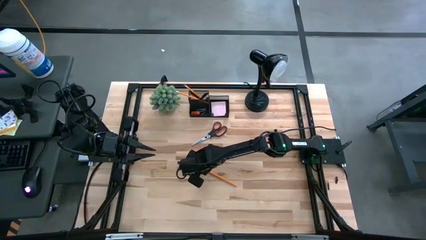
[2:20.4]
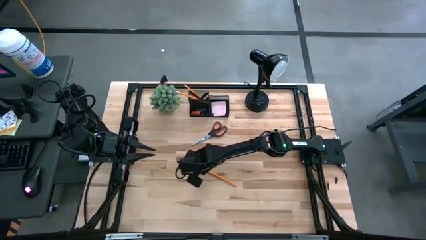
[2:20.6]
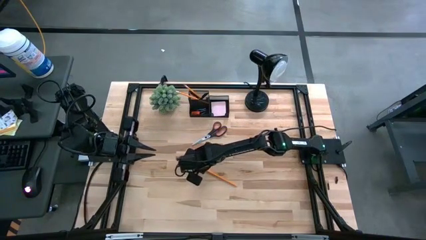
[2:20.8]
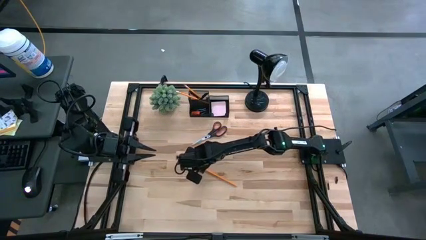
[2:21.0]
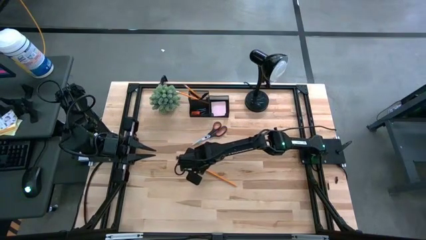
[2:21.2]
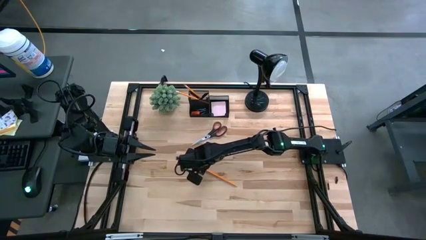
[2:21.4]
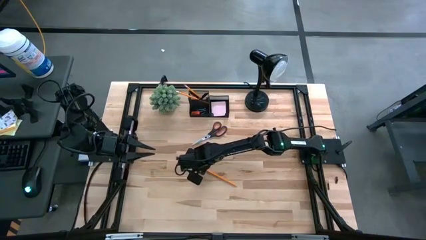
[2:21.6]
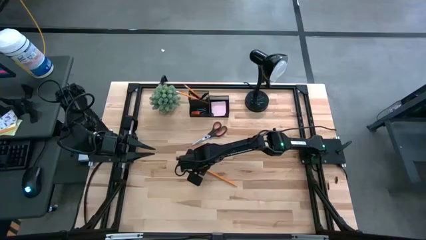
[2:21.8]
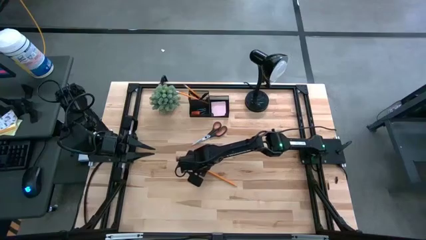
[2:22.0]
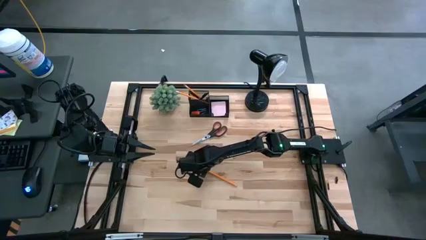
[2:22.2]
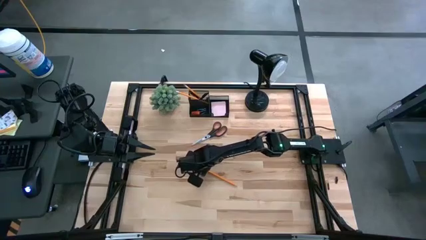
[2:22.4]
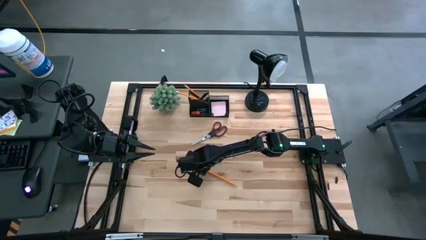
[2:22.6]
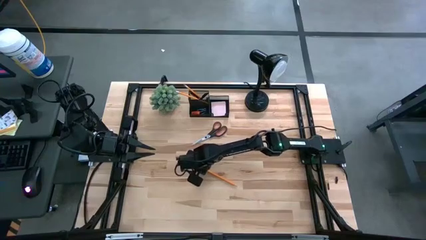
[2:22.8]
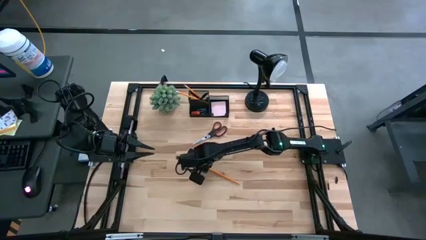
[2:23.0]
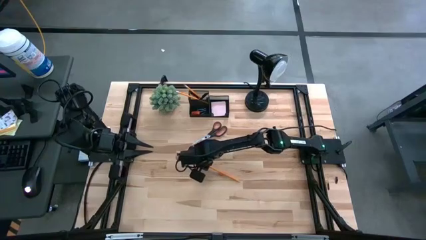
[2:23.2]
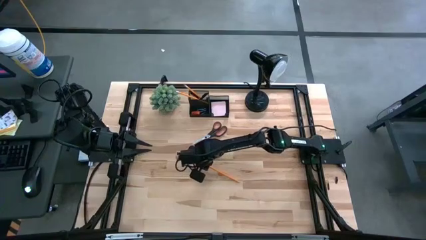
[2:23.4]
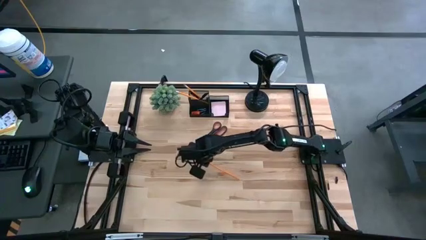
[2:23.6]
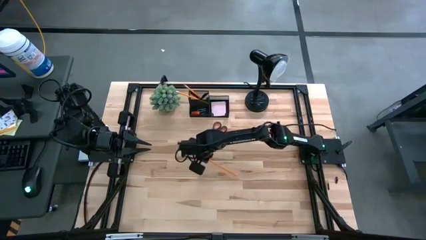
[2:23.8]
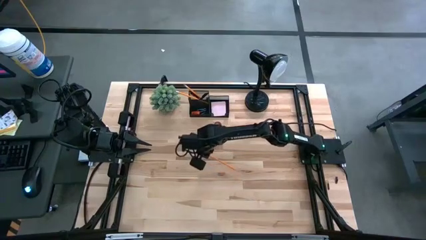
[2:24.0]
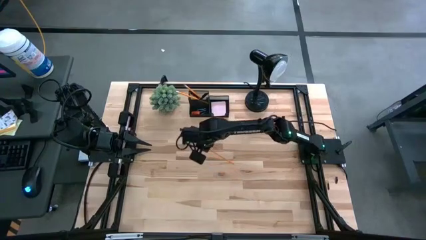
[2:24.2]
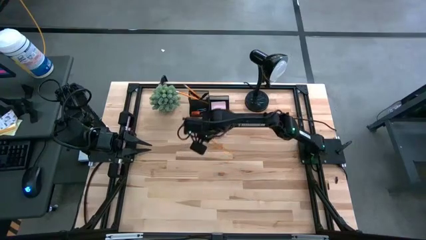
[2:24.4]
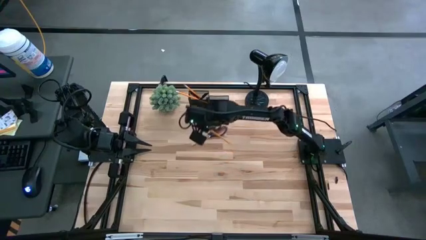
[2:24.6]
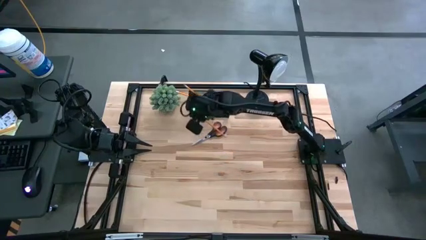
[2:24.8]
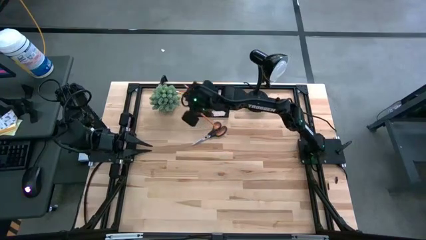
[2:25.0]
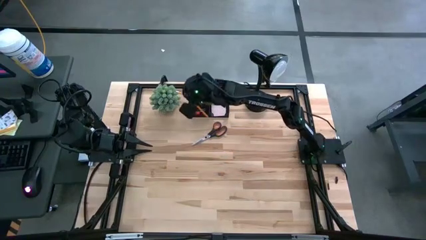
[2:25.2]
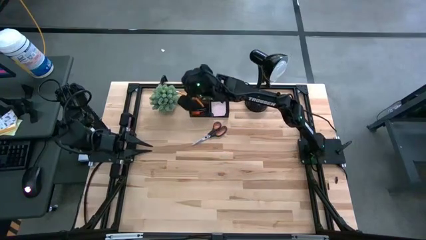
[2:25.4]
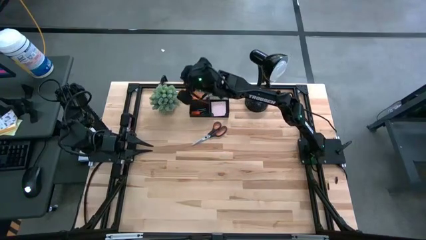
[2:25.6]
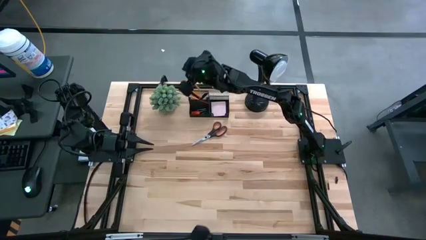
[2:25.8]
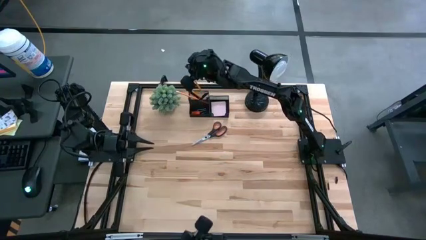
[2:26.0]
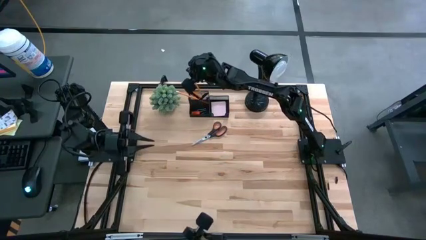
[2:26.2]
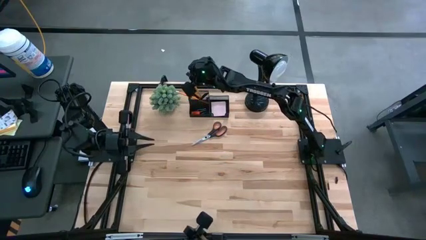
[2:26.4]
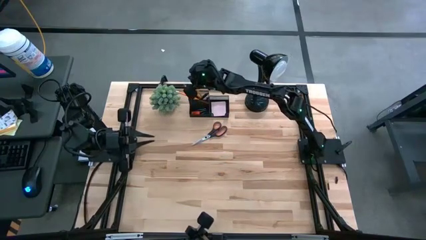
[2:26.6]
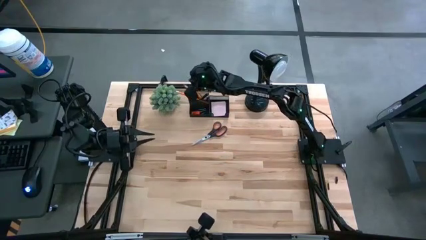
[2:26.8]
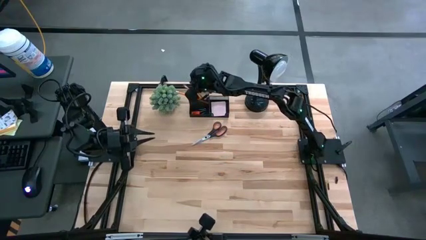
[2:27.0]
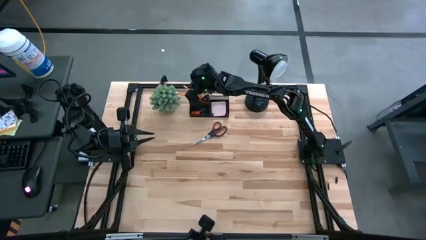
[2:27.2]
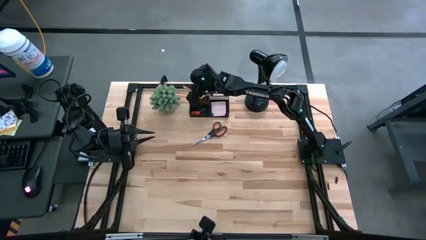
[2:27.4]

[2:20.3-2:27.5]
Task: Pick and place office supplies into organizer
Put the pencil into the black desk organizer

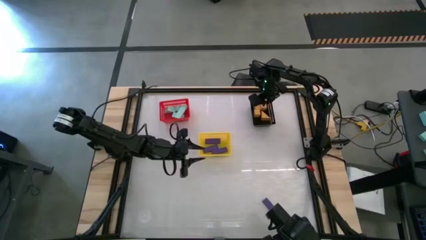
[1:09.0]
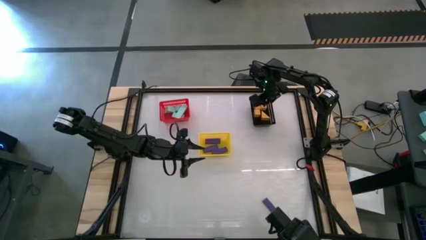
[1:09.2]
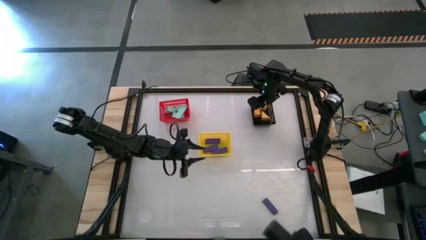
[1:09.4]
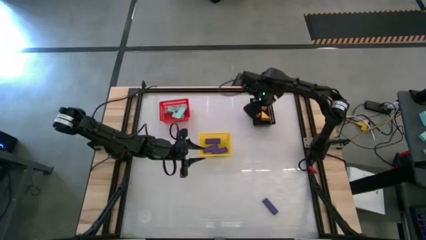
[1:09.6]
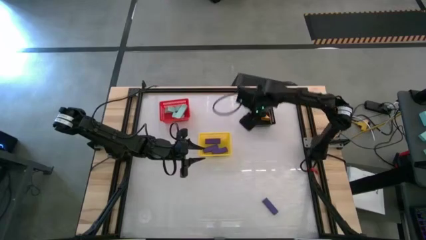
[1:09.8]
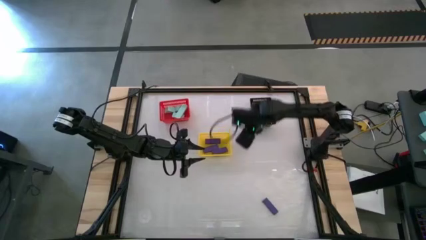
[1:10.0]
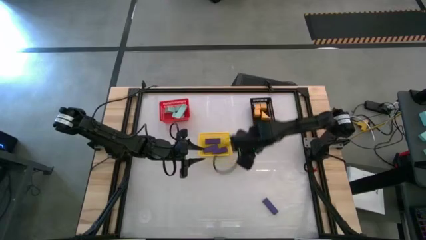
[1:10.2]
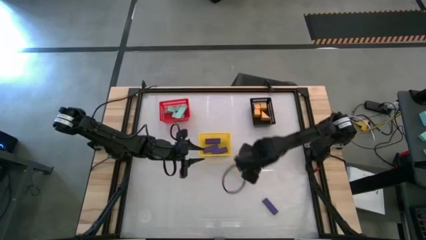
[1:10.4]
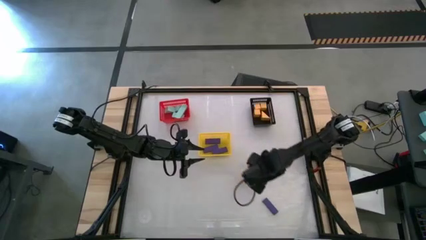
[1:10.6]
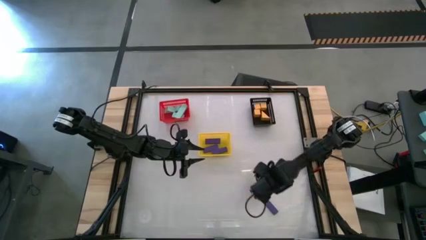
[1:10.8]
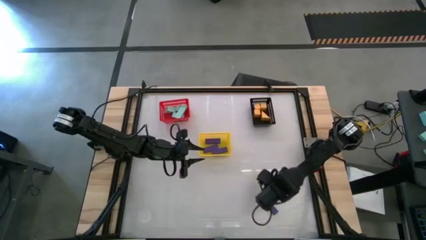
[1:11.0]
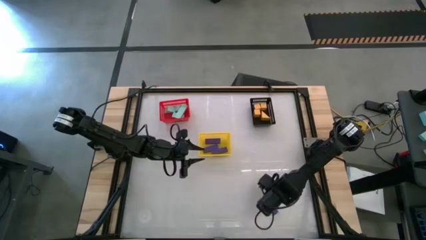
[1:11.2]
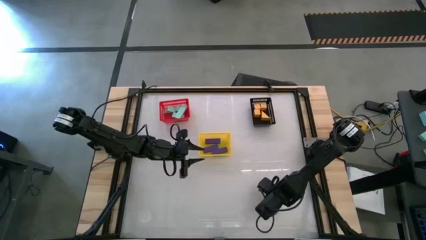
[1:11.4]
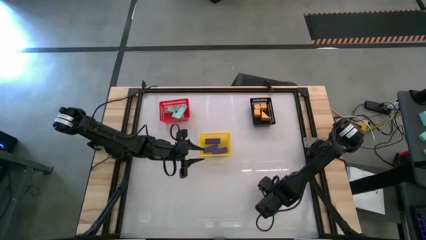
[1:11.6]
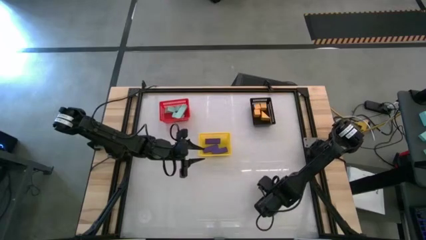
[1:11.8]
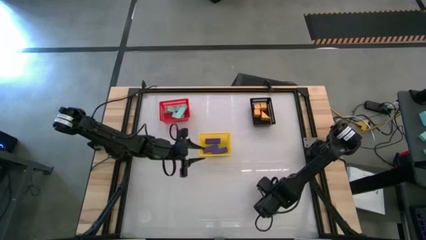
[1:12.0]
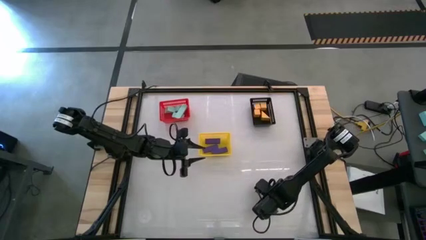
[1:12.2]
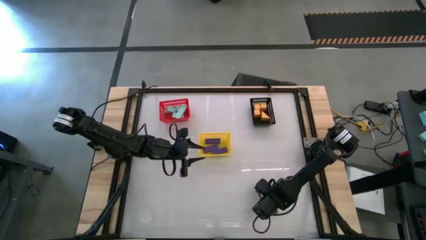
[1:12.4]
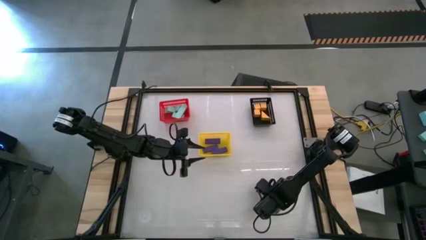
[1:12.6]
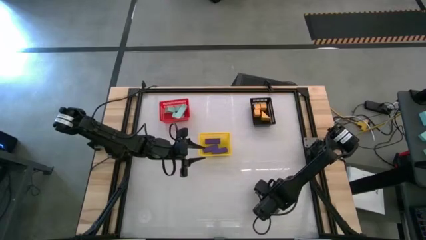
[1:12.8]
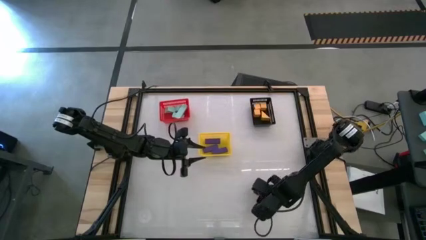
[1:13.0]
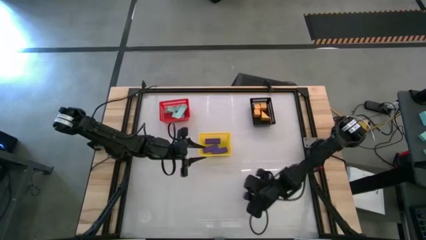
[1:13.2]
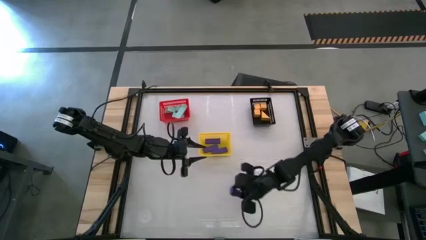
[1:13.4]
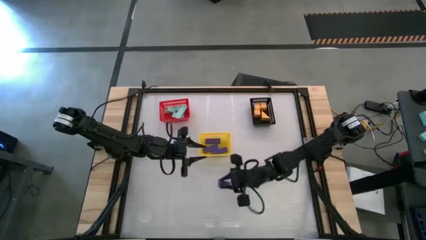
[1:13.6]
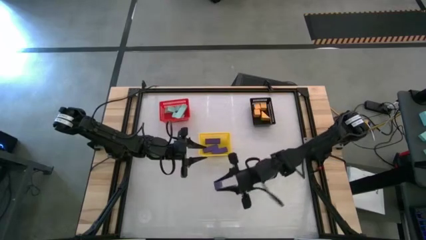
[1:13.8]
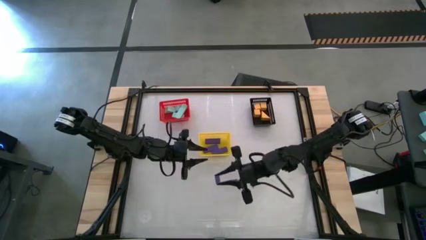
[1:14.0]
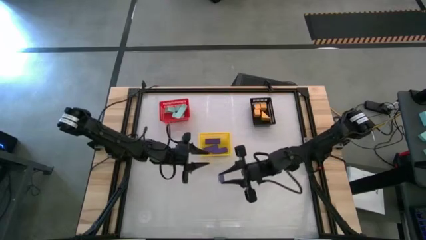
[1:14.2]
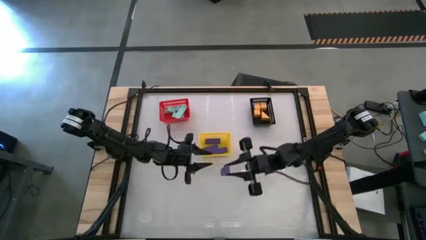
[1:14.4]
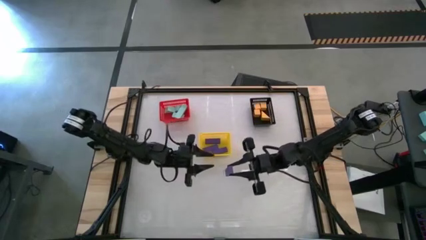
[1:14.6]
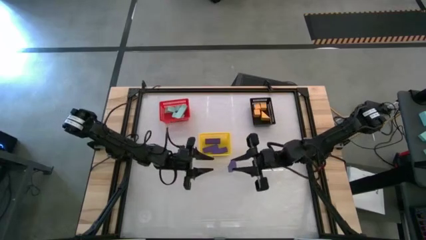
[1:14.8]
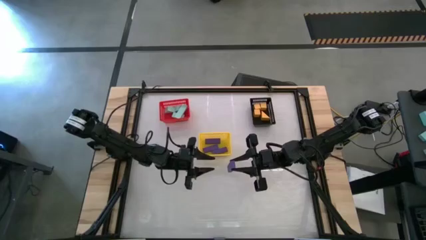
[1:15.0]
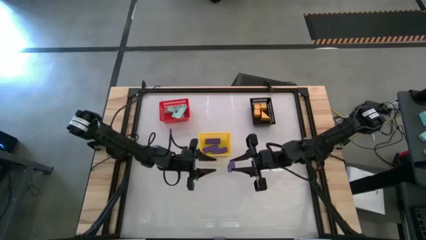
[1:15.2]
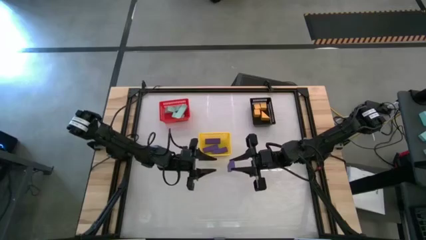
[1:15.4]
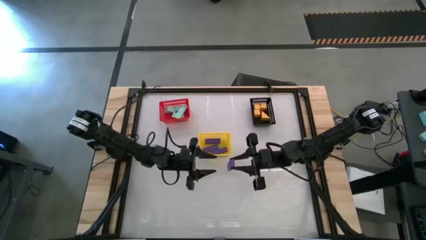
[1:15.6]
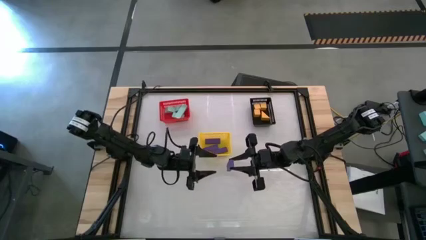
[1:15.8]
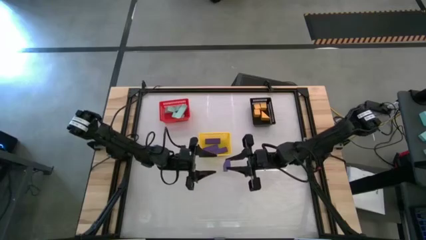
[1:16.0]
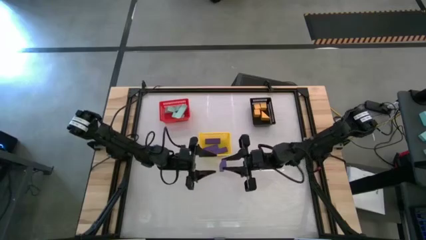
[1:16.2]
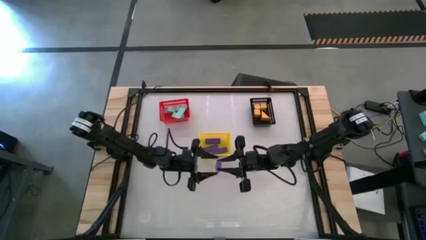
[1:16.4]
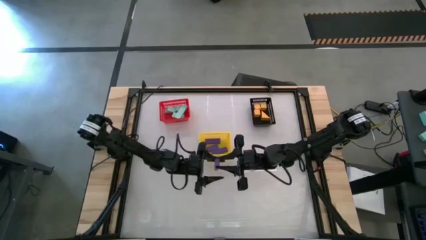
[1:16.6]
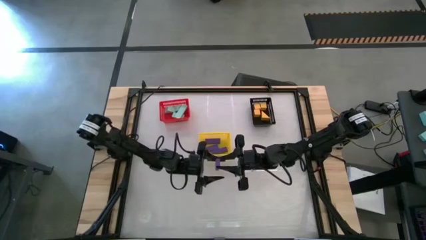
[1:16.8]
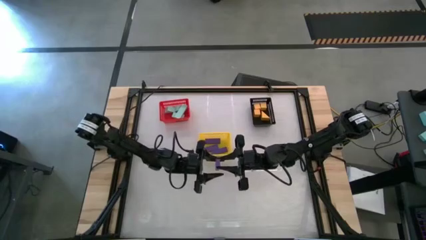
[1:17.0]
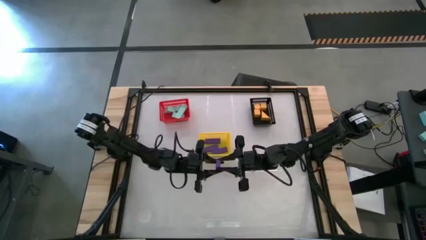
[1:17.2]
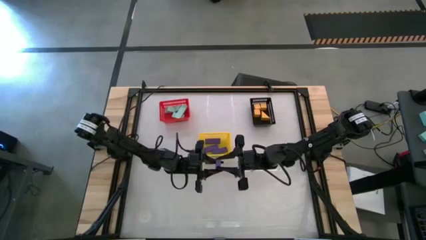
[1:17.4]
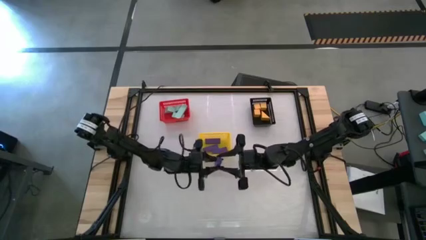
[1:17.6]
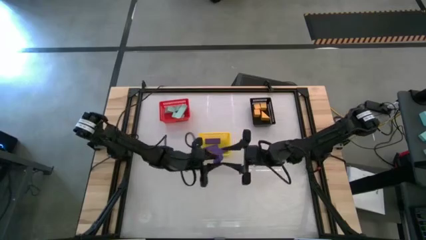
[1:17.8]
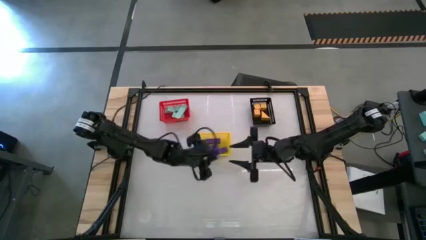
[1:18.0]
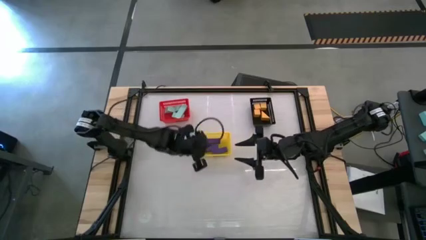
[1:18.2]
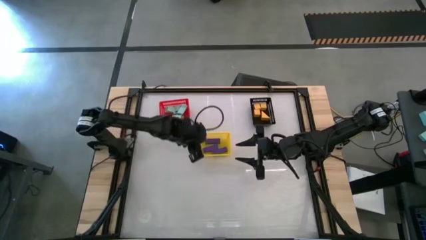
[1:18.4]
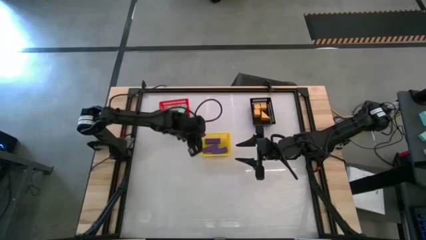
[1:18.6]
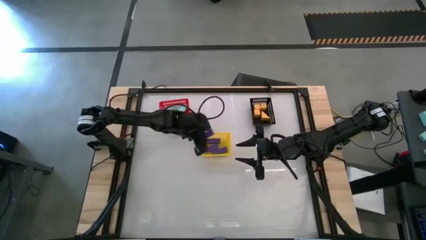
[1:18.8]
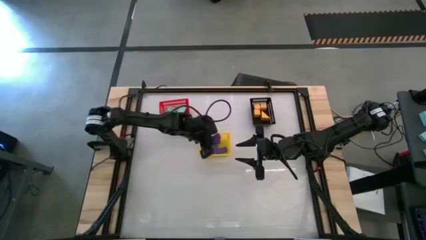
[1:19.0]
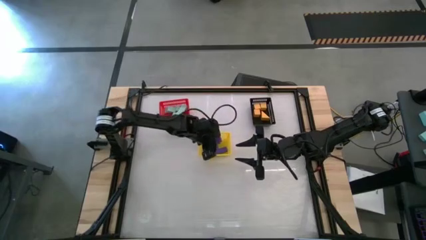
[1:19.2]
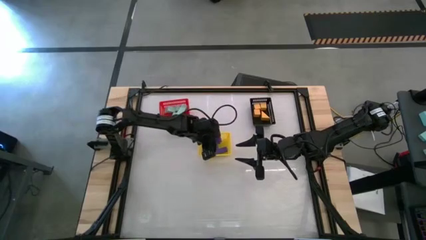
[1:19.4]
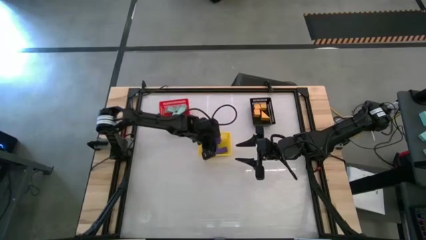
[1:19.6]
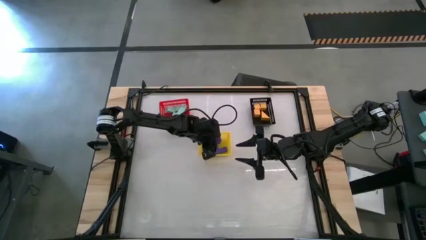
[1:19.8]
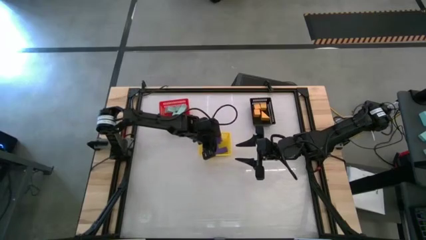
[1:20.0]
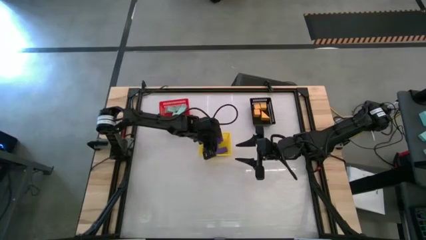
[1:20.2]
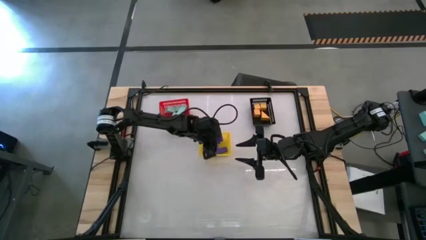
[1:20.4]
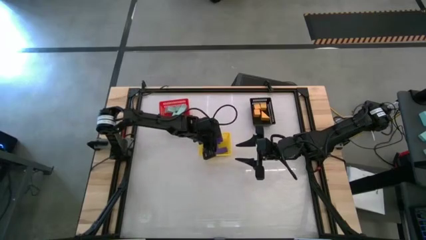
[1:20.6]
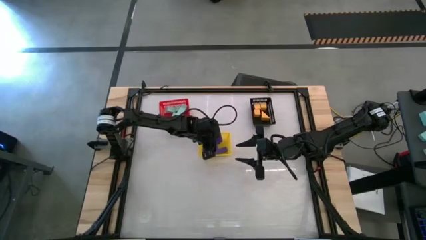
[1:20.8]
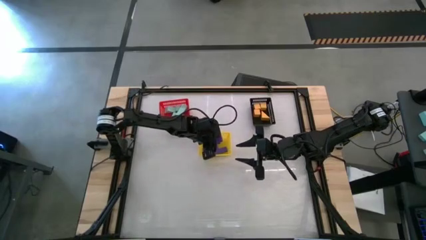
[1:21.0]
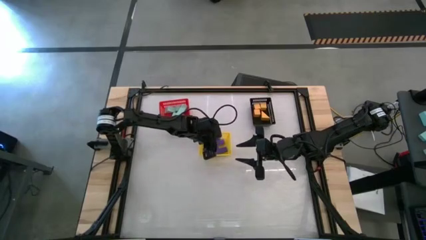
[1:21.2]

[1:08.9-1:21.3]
Task: Sort & place blocks by color
Put the violet block into the yellow bin
